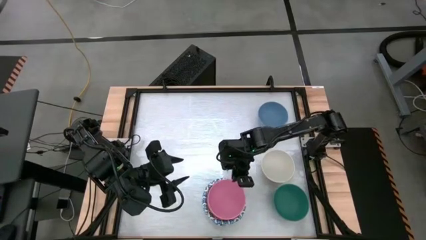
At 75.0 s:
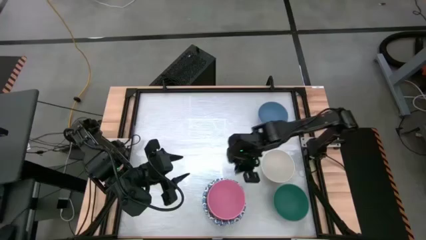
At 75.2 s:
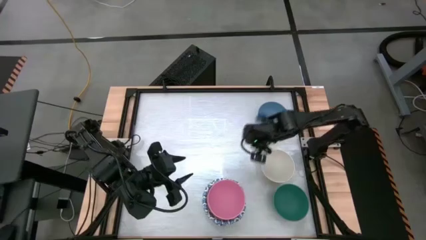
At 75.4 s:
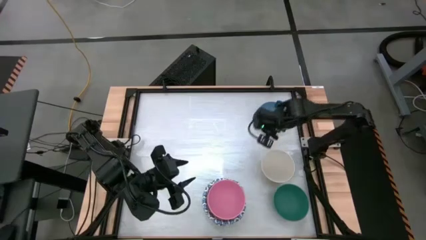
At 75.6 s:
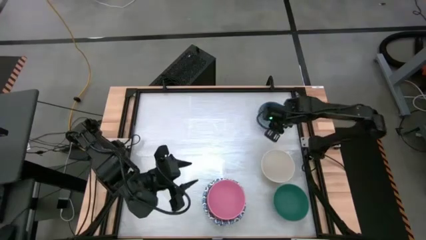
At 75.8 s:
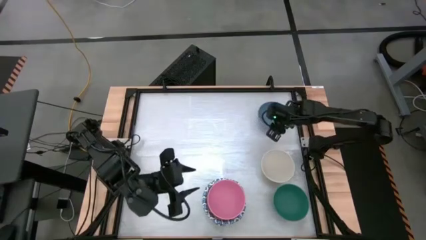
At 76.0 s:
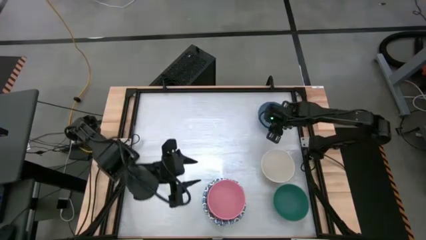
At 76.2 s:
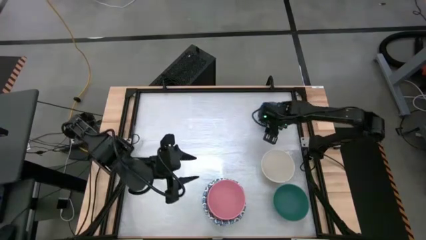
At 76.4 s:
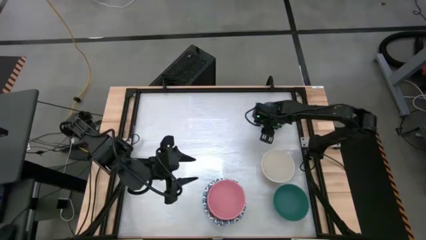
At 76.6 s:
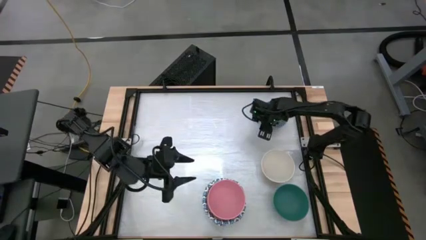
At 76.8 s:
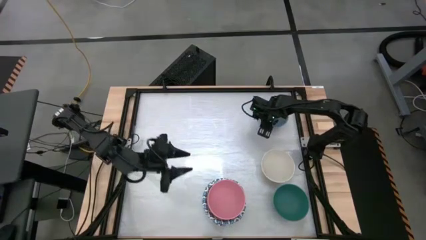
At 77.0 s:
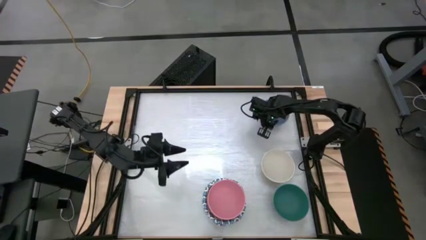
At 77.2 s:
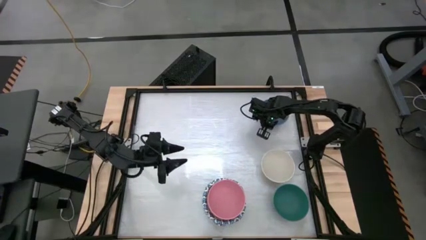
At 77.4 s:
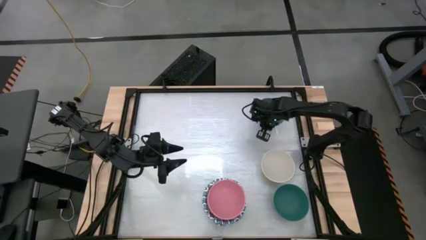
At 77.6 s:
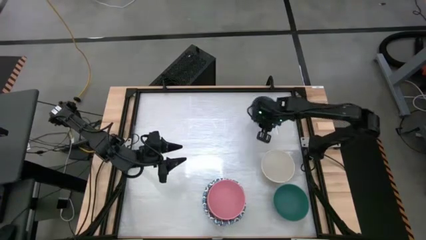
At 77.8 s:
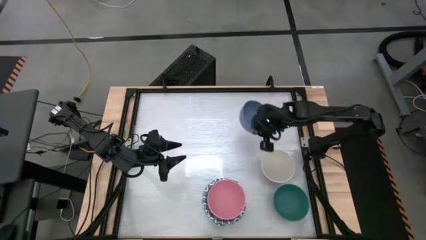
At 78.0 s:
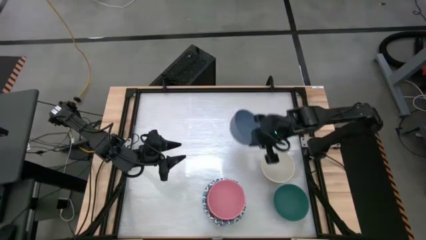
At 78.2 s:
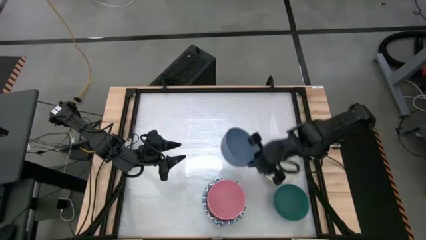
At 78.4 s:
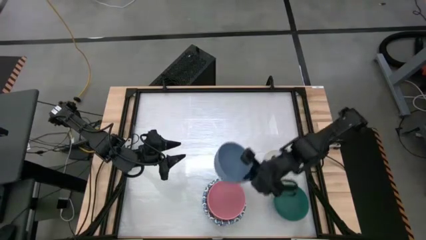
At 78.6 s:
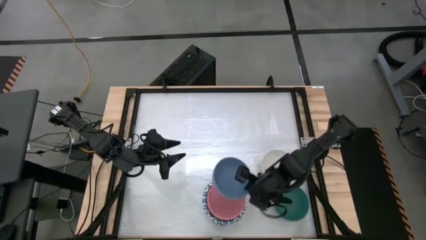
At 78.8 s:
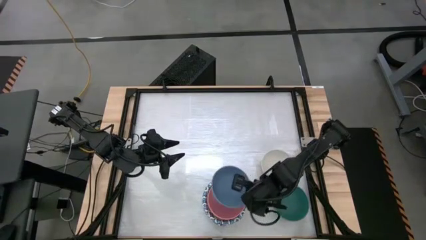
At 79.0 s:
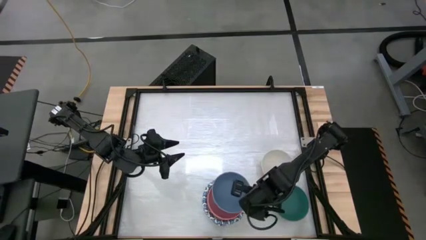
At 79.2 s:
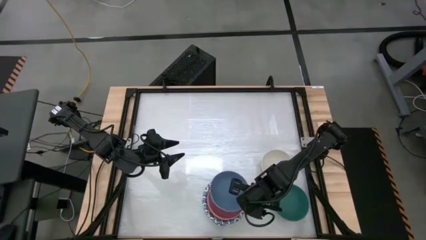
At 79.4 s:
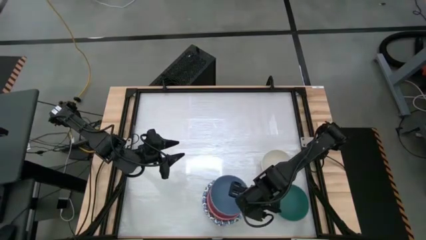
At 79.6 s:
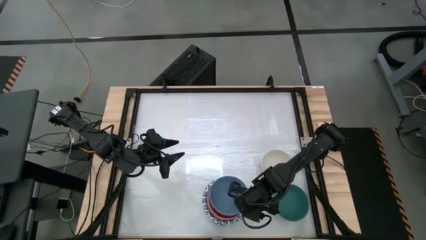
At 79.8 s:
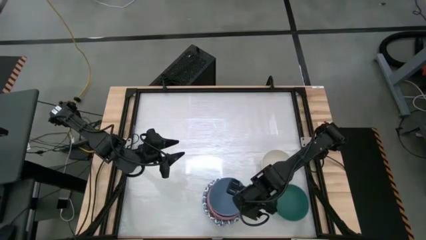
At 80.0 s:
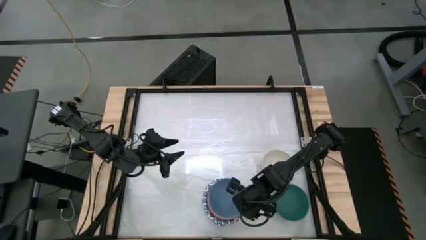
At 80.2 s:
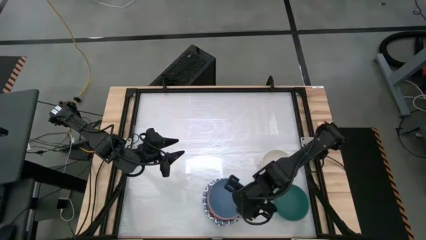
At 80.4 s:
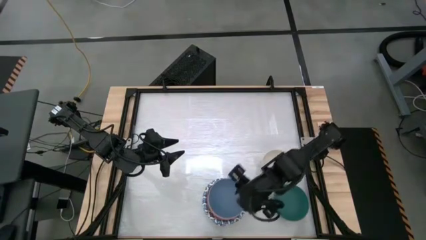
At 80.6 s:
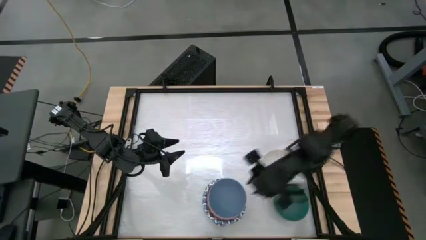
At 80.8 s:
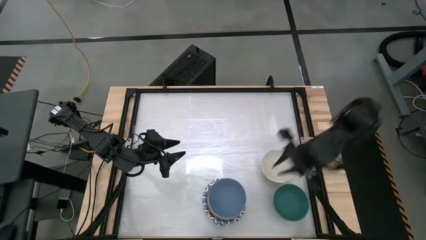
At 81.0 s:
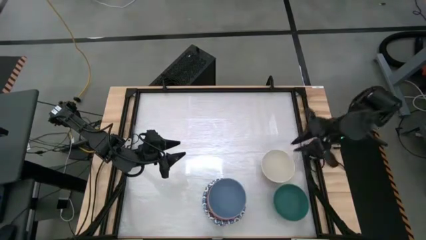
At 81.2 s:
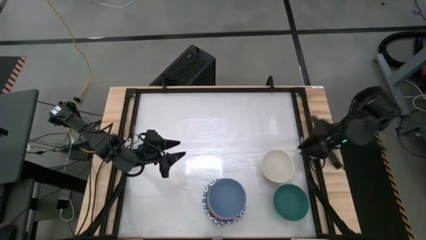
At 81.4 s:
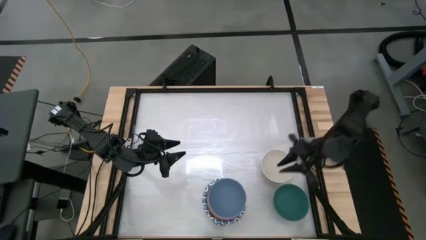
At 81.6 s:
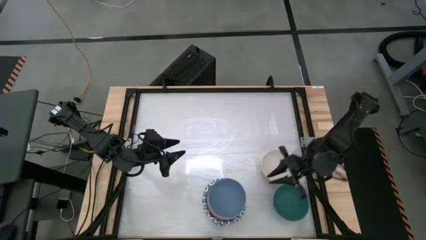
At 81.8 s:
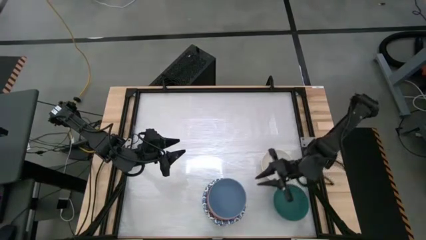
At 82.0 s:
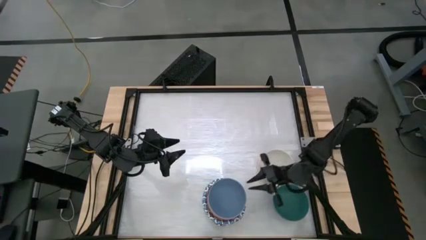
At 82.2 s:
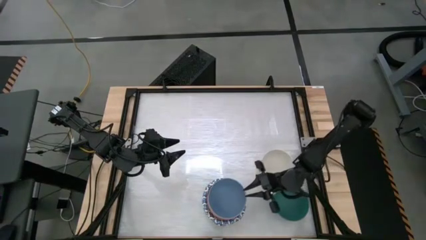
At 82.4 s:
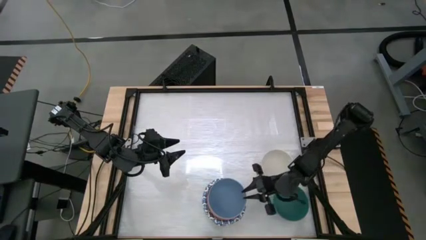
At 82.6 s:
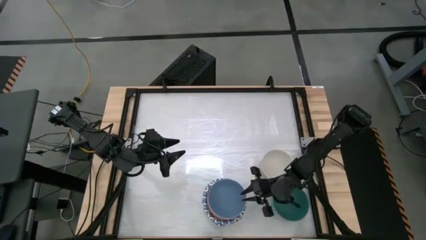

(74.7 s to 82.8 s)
Task: Nest bowls inside each other by size order
Stack the blue bowl on top of the pink bowl

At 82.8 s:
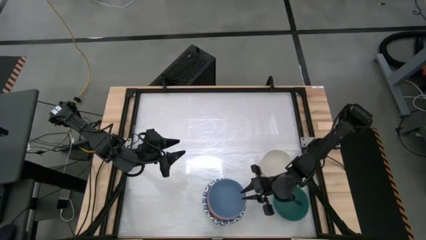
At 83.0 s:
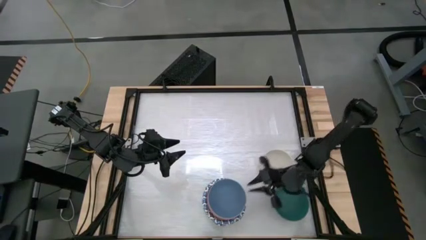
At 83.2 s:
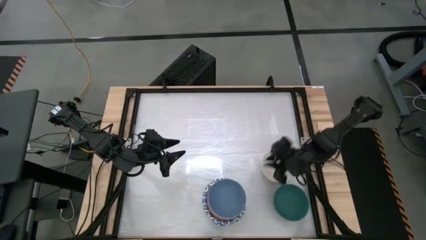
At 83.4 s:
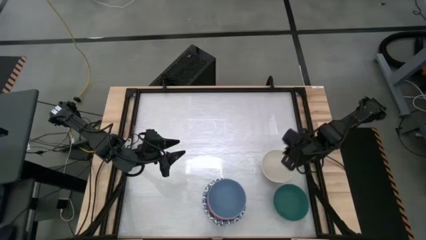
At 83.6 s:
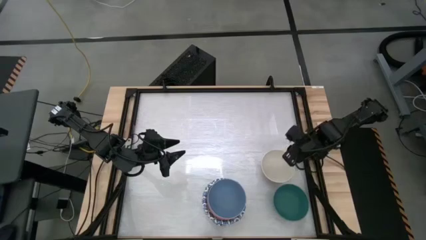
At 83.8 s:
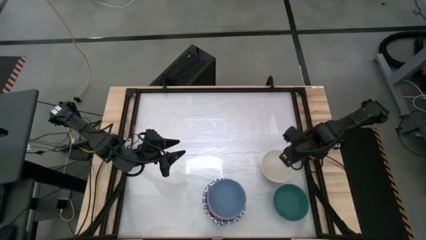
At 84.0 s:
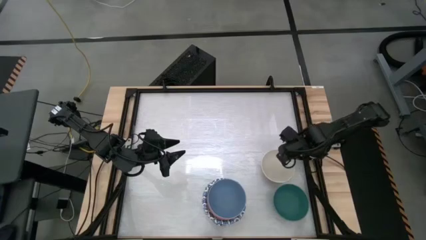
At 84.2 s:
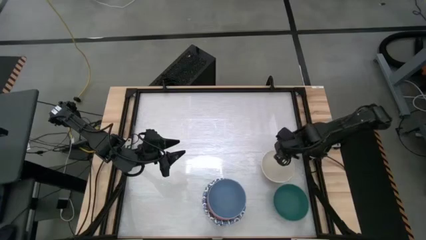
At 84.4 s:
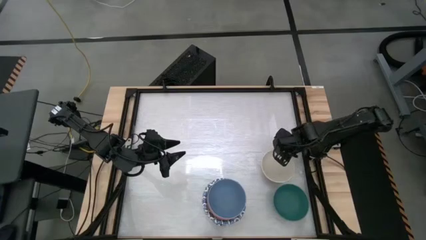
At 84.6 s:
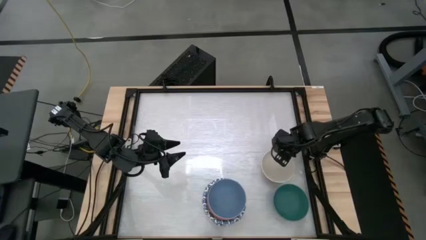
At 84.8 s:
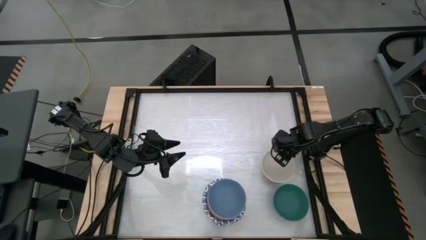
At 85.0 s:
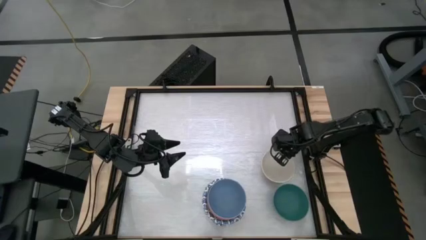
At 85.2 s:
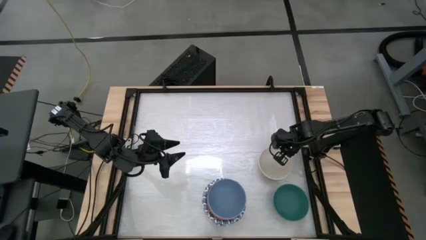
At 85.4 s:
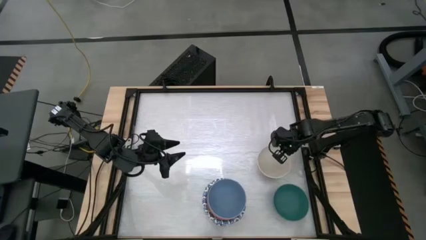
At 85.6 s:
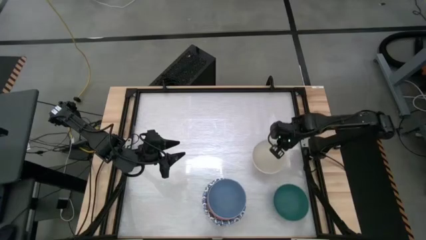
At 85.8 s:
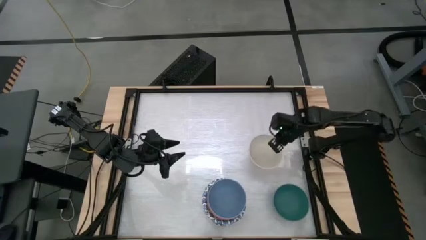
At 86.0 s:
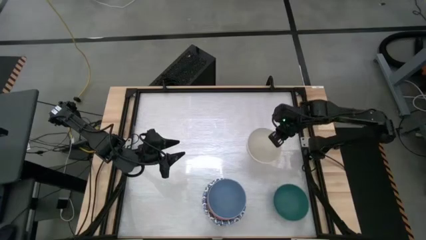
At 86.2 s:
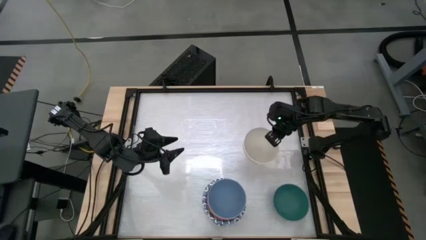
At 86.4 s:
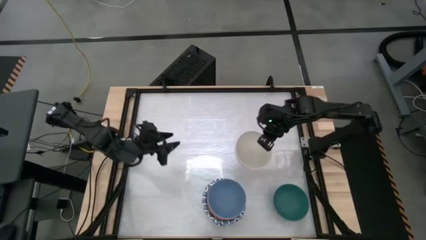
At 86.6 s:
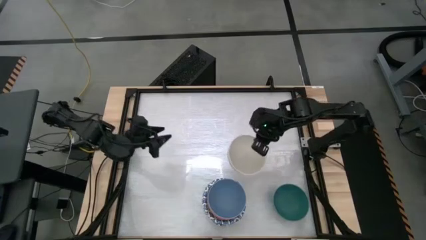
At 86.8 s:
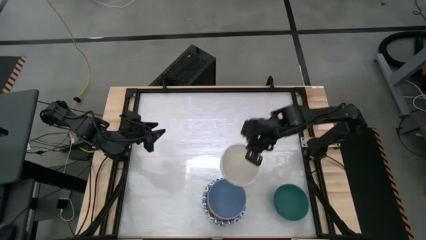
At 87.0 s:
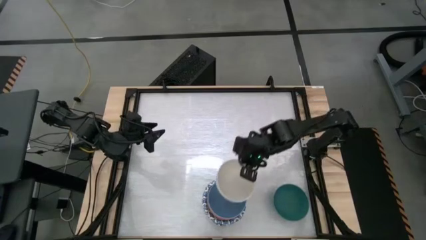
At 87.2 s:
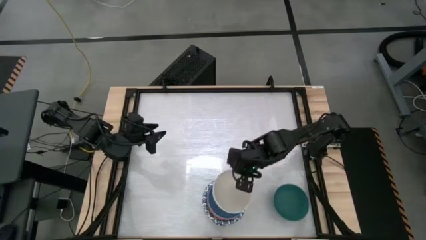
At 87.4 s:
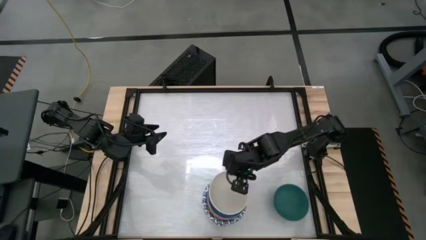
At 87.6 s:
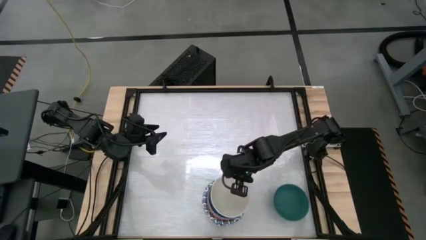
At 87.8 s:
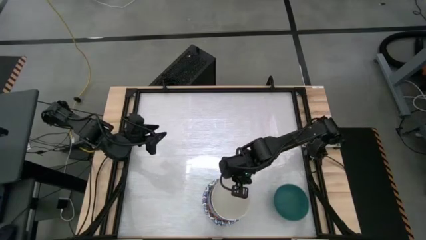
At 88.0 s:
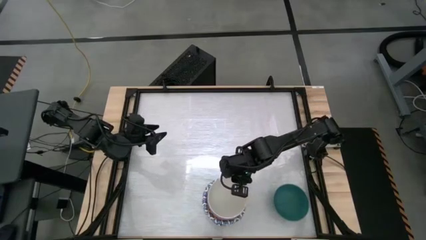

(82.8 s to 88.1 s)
Stack the white bowl on top of the blue bowl

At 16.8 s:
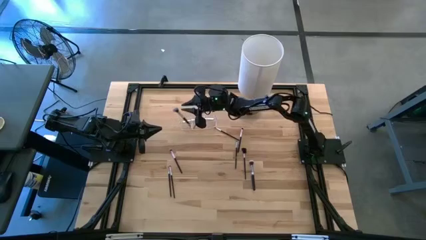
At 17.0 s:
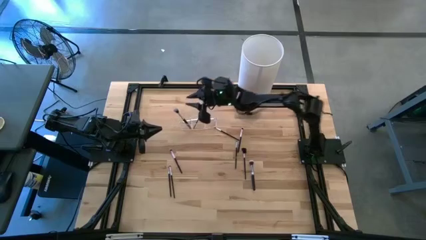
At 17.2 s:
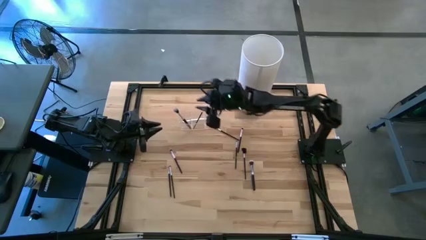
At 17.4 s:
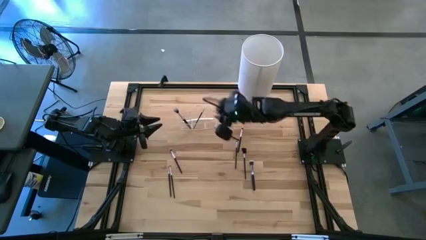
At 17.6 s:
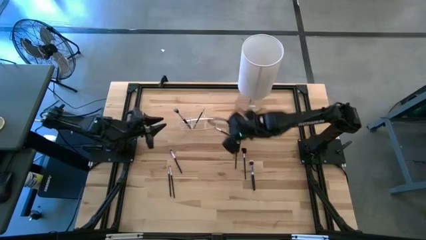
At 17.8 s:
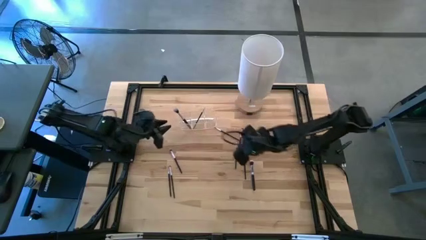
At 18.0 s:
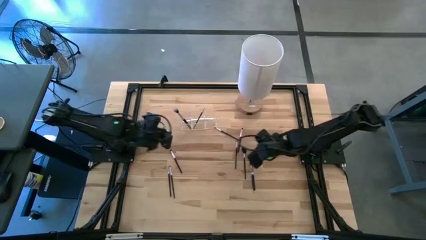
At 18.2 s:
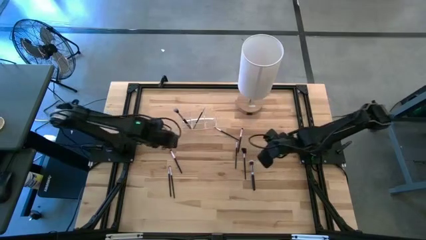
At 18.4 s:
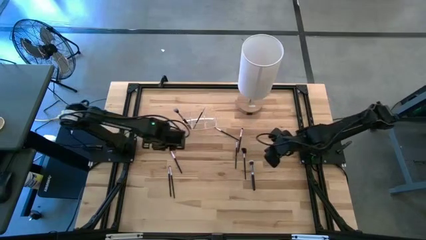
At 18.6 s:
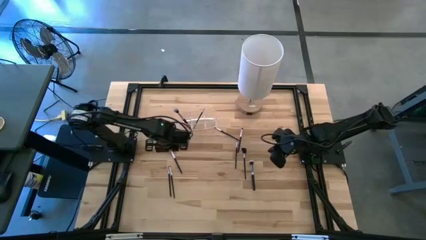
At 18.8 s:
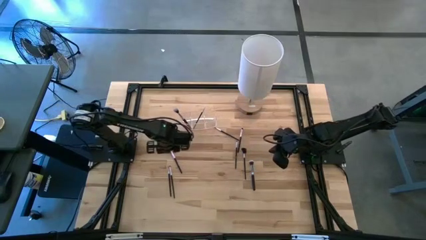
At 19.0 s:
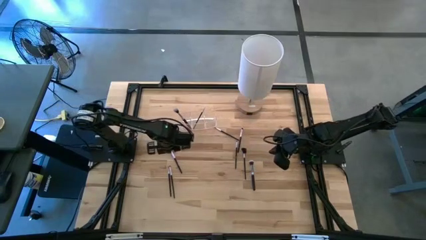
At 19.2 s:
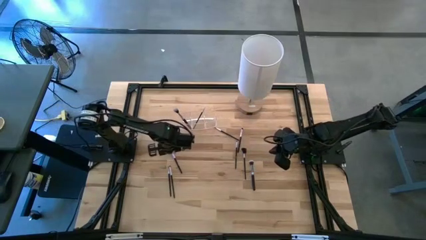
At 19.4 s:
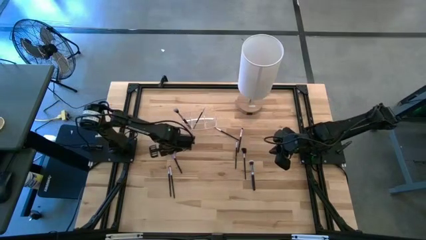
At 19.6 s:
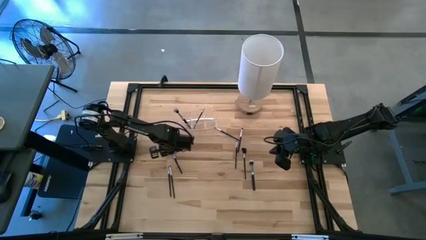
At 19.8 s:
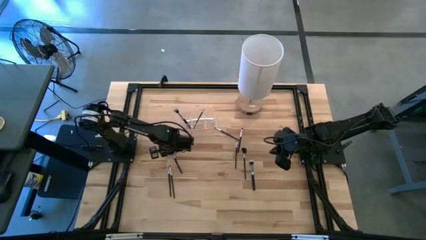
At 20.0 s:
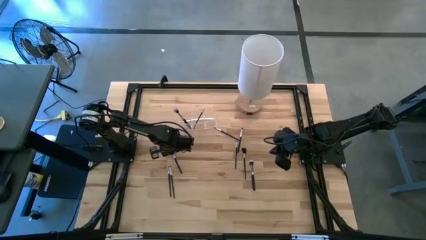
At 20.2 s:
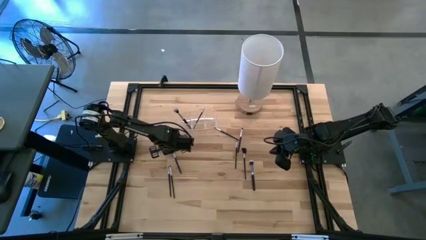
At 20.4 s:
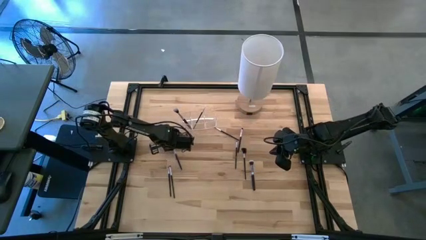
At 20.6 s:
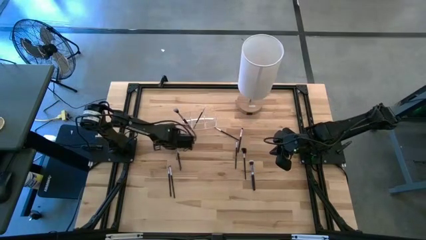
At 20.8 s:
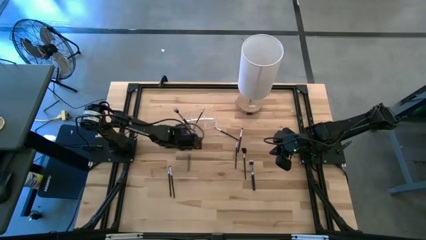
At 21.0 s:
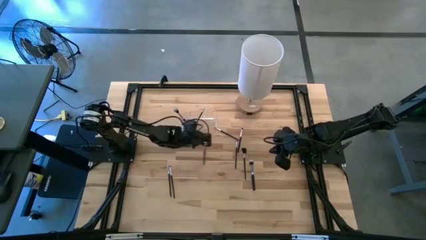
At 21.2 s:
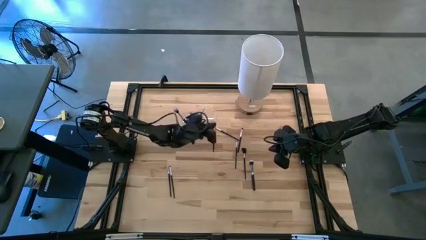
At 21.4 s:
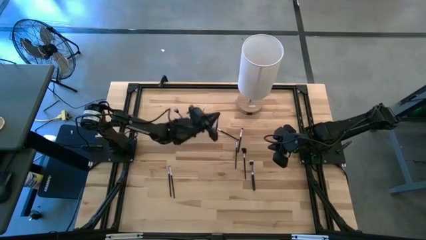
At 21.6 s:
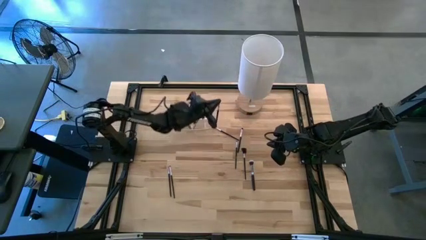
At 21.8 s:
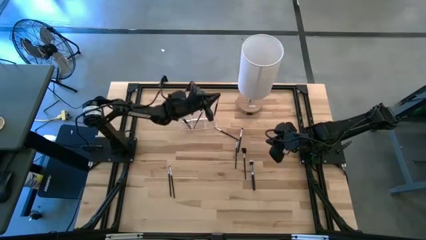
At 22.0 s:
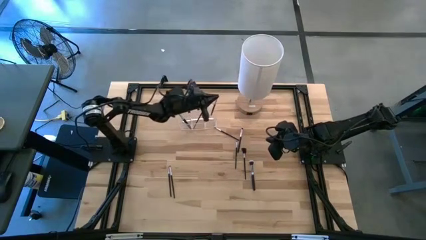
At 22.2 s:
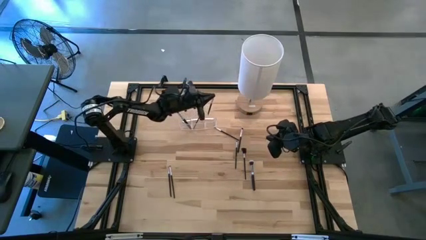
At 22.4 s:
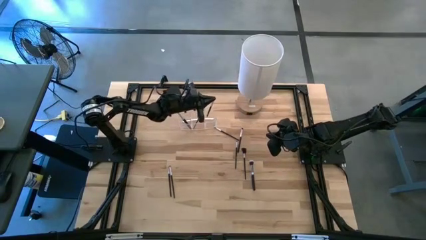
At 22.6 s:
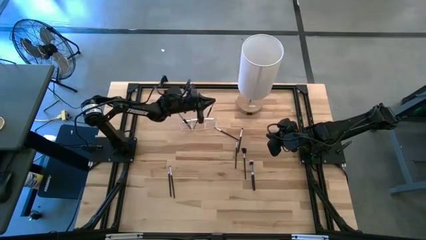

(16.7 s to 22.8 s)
Task: Put items in baskets/containers
Put the black eyeshadow brush into the transparent organizer
